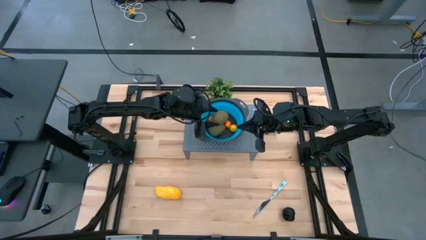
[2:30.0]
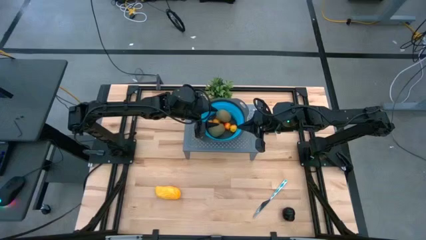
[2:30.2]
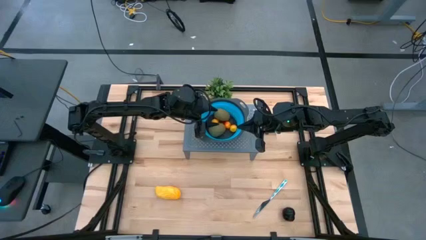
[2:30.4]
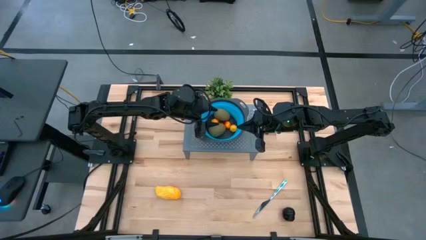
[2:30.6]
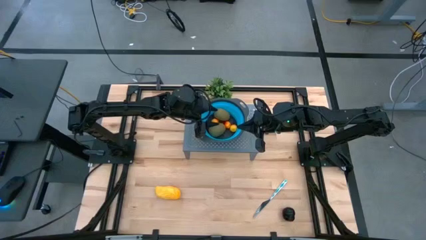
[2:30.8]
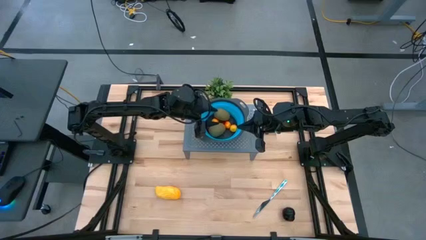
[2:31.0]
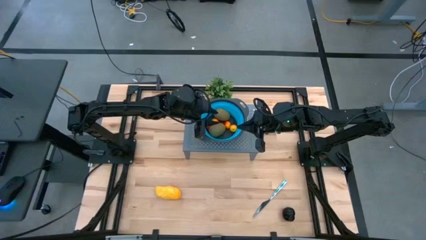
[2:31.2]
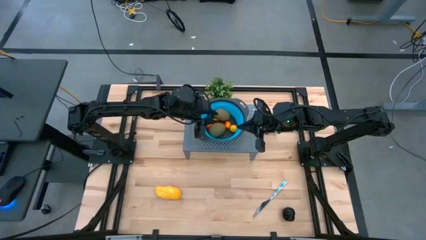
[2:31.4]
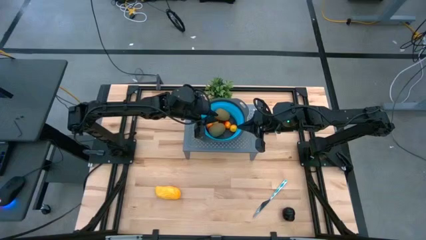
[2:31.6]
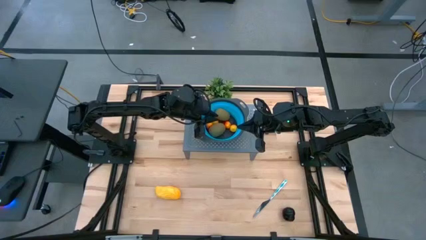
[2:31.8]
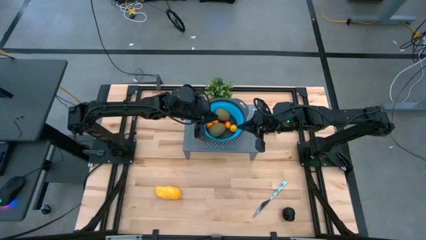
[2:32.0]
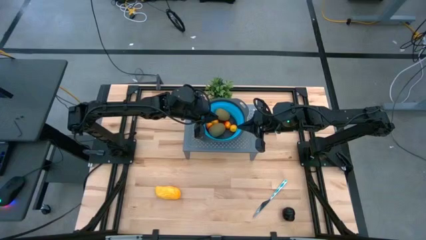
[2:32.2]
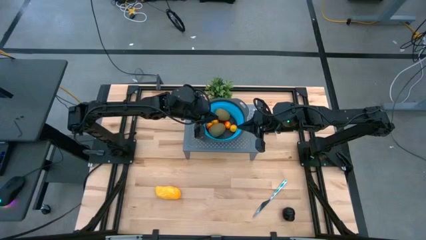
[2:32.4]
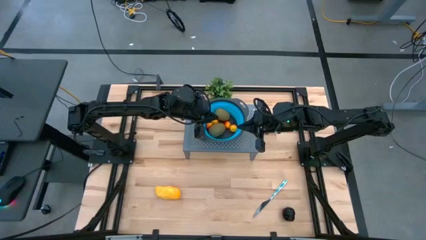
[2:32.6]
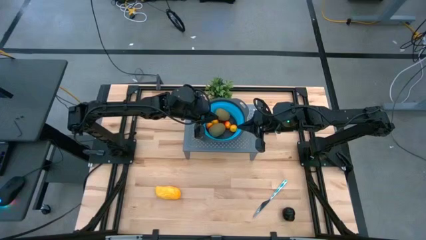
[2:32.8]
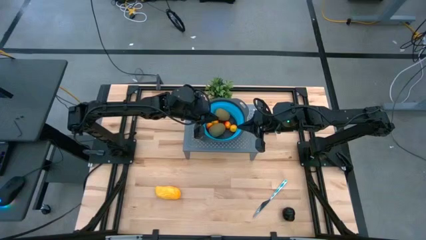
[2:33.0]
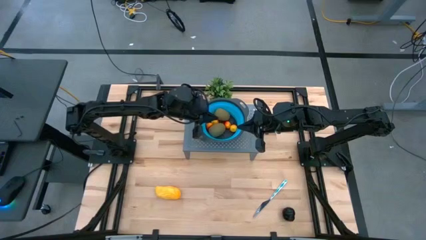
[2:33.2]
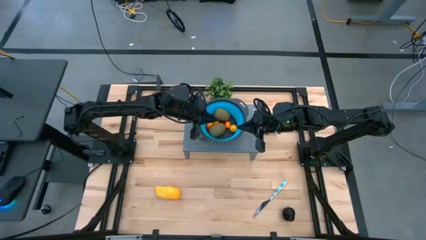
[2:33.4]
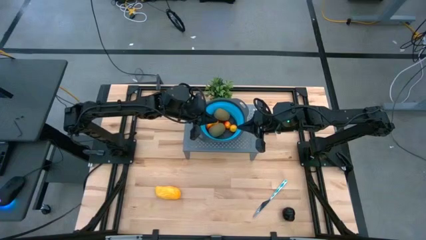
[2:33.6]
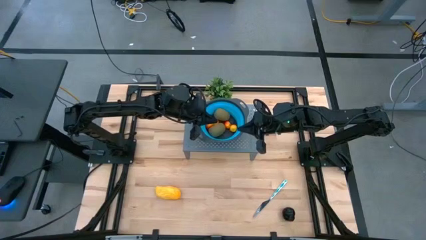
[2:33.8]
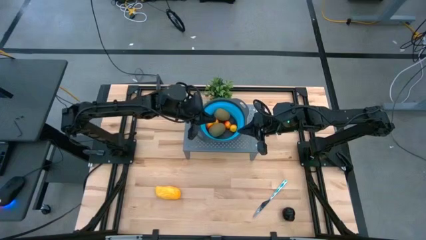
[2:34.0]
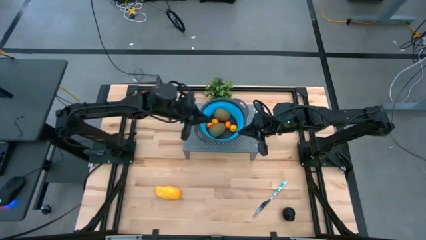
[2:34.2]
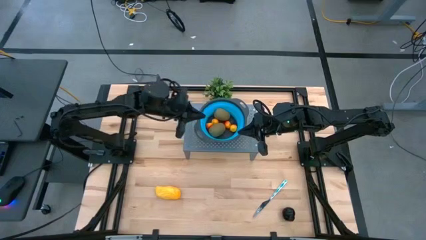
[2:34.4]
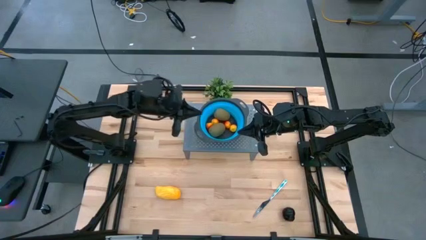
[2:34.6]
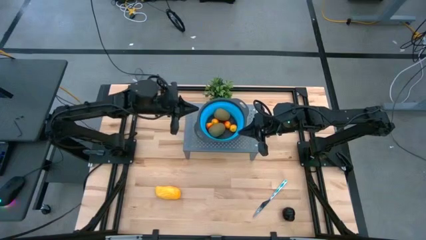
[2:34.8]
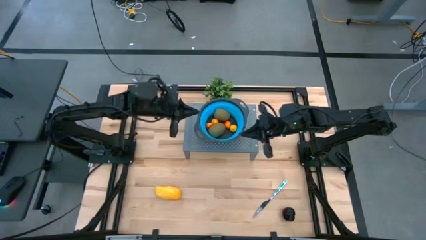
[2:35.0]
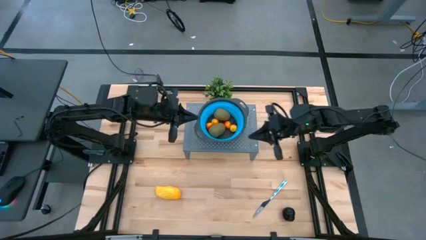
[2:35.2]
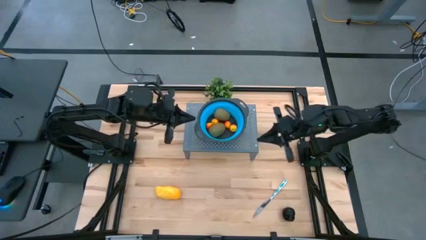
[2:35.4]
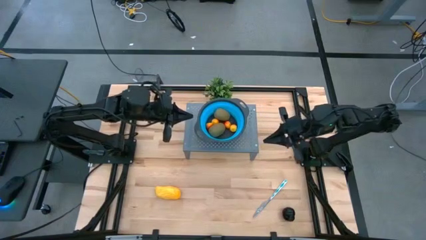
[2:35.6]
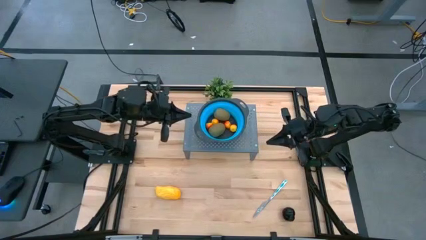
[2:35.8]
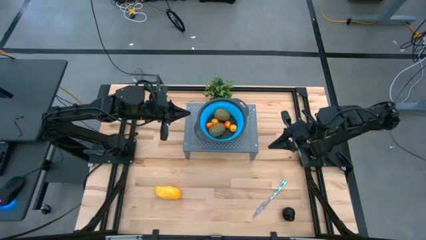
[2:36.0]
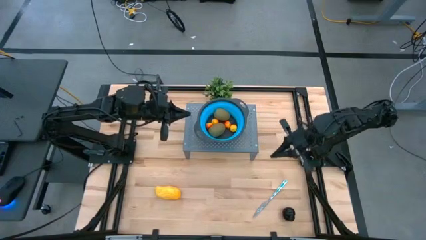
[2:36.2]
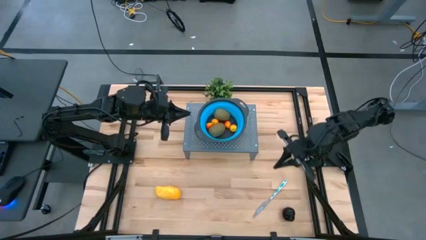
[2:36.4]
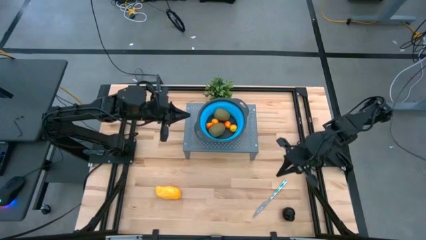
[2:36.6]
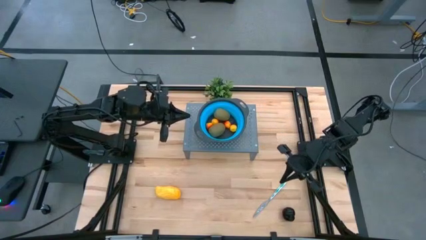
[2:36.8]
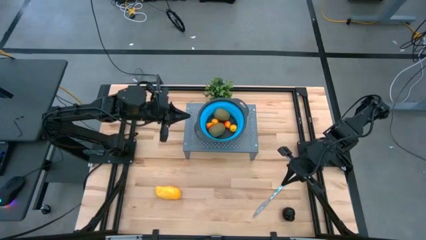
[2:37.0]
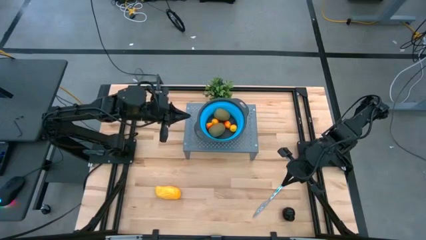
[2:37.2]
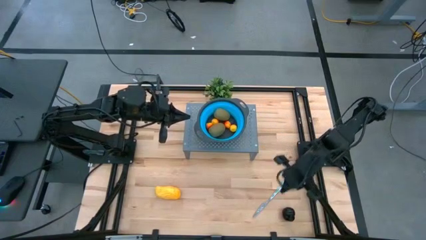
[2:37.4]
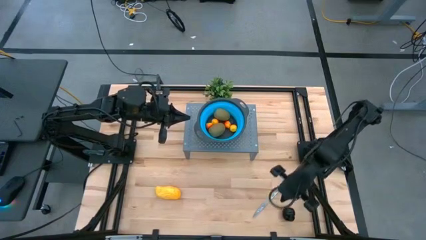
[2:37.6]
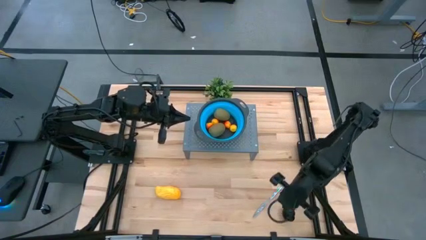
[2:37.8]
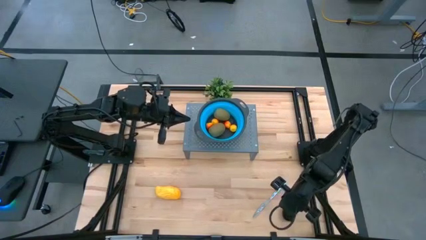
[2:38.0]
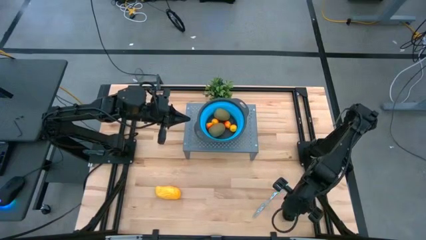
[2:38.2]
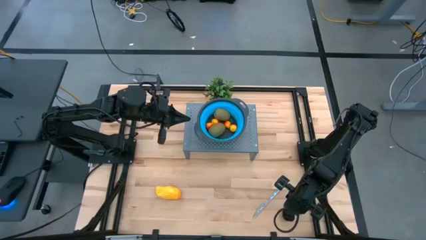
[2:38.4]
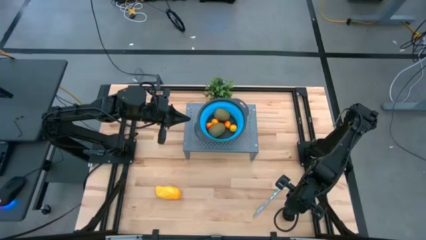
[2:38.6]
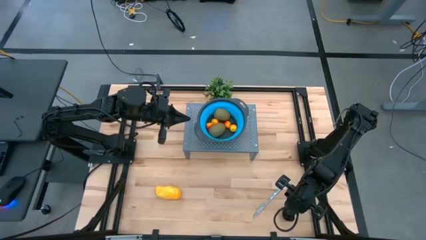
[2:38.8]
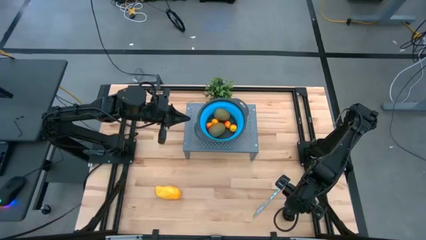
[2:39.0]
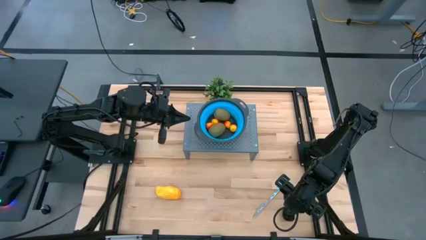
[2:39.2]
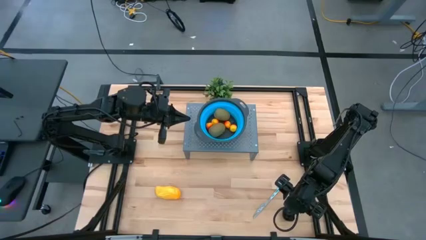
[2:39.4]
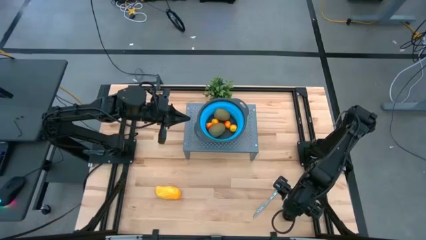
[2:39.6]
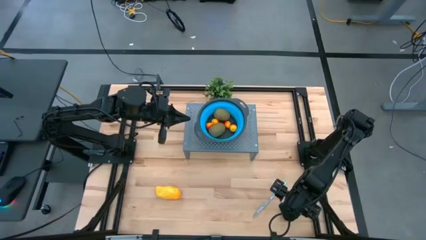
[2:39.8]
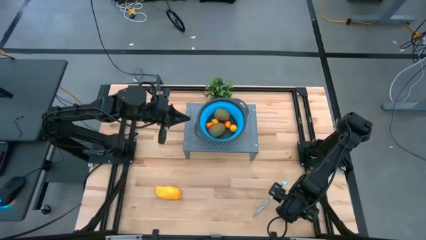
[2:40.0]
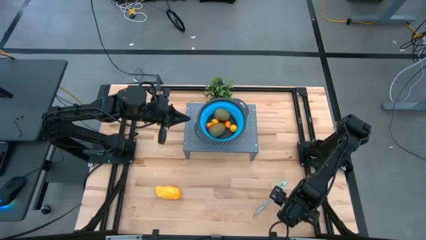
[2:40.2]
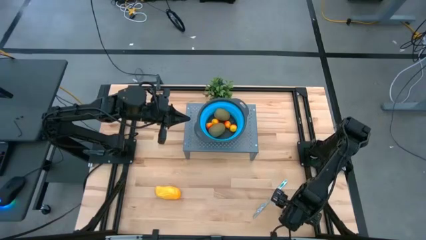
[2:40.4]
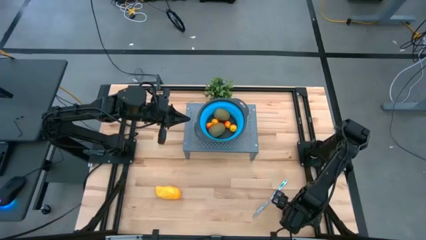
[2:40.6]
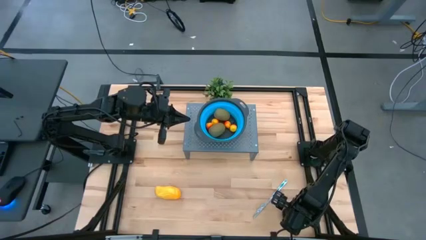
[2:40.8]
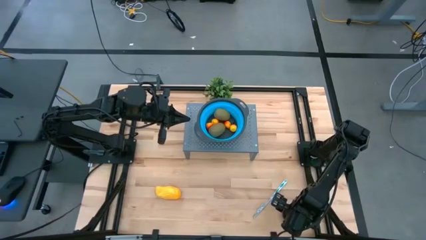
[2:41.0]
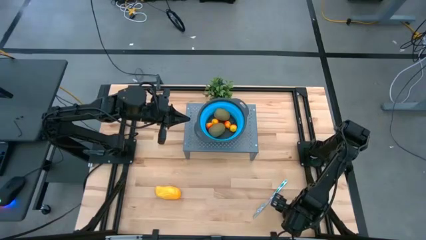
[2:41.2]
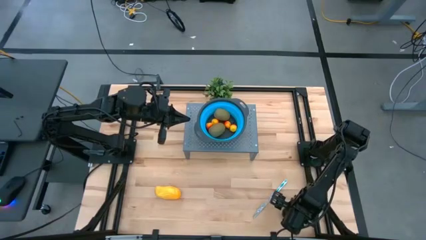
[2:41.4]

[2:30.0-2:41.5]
Task: Pick & Place Fruit
Put the plum into the strainer bowl on the shelf

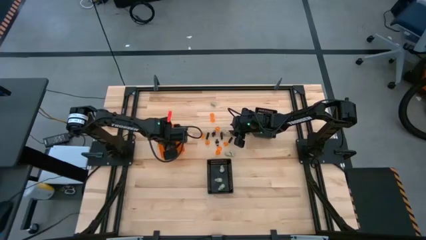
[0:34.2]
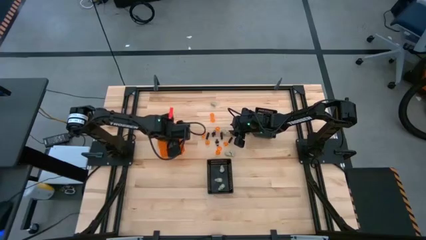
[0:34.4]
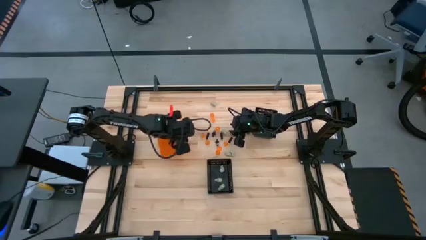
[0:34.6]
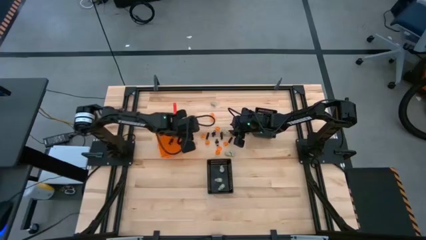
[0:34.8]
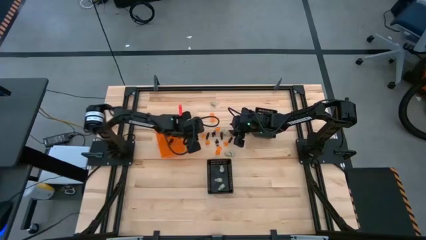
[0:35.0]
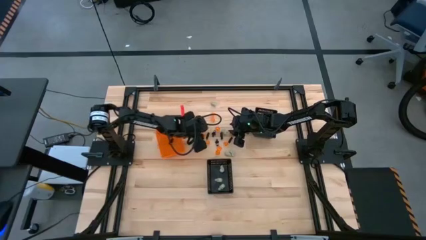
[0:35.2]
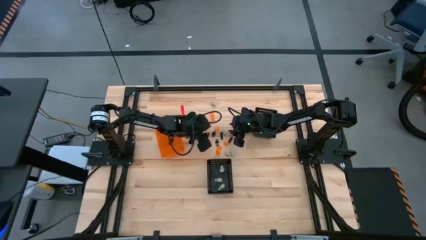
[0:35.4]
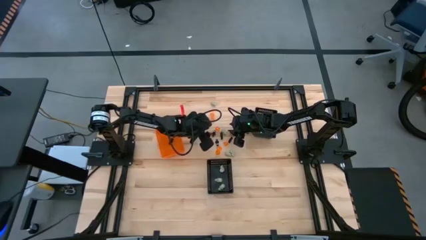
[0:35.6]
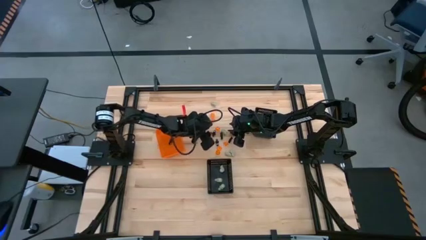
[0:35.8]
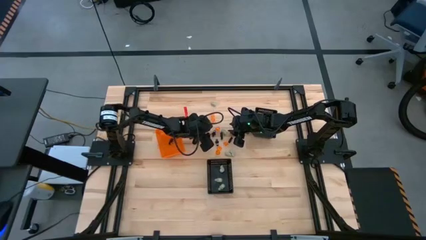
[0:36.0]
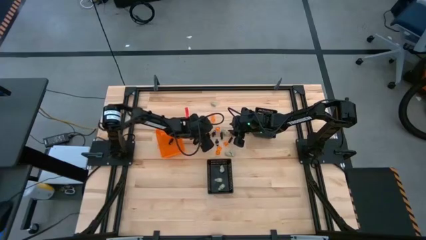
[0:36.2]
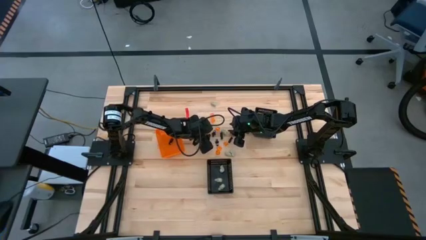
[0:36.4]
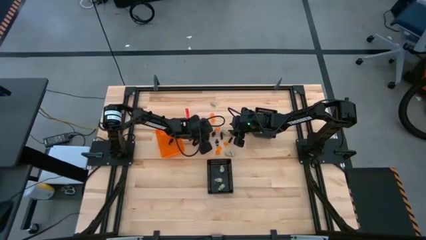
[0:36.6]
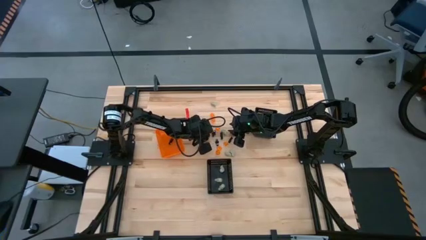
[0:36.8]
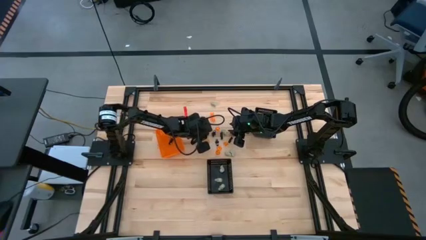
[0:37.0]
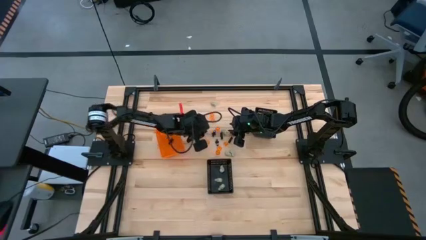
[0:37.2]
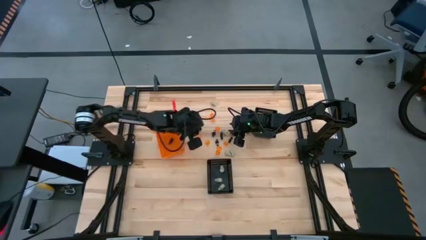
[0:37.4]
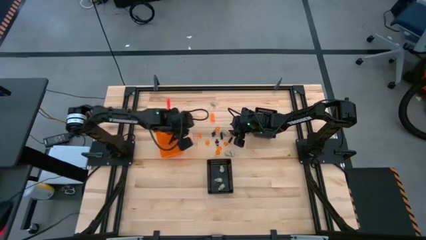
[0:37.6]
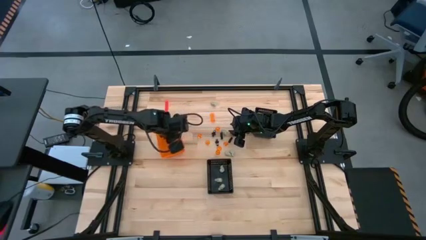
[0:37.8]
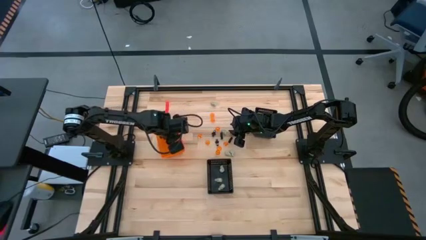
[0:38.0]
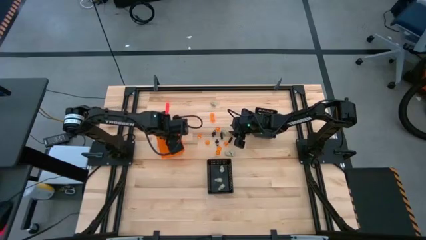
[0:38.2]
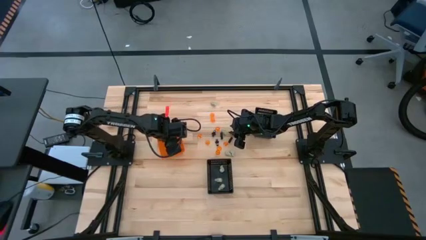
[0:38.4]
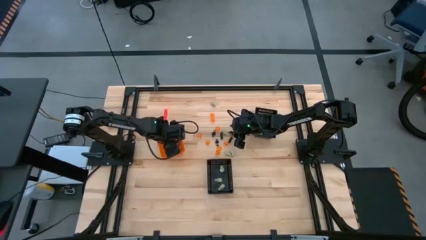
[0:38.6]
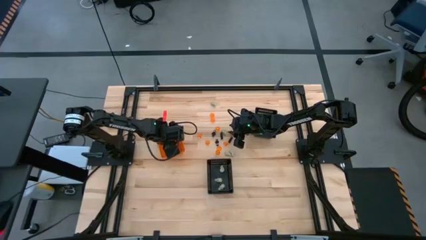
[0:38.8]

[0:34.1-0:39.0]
Task: Sort Halloween decoration
Put the black skeleton toy into the orange bin
